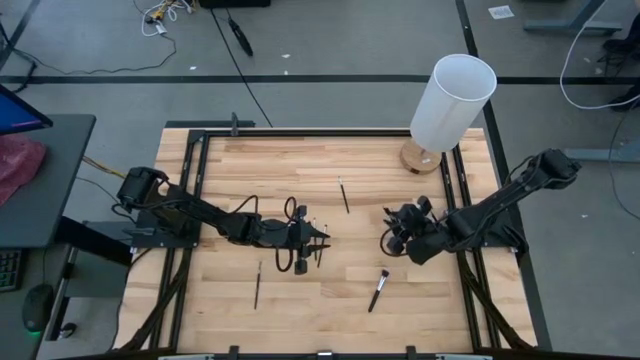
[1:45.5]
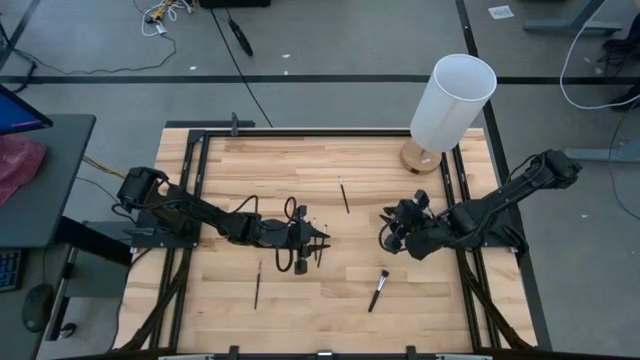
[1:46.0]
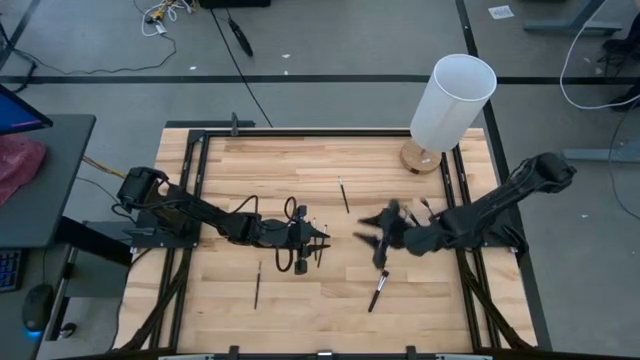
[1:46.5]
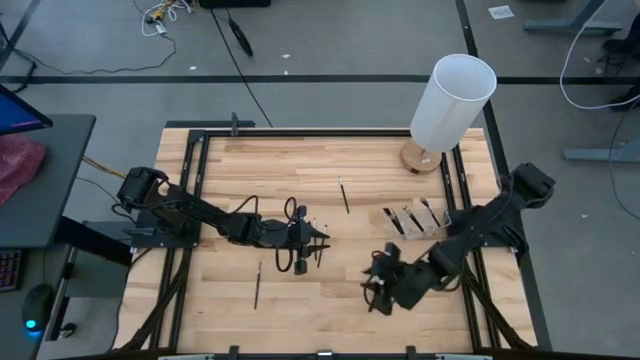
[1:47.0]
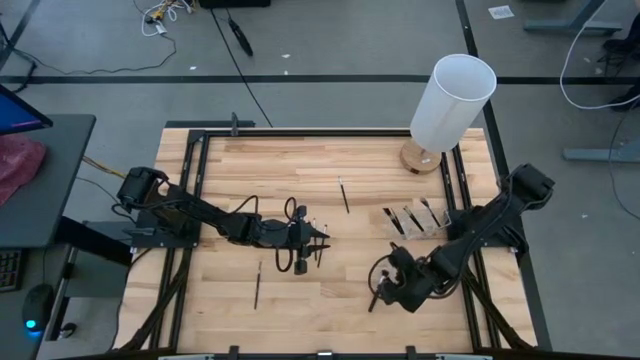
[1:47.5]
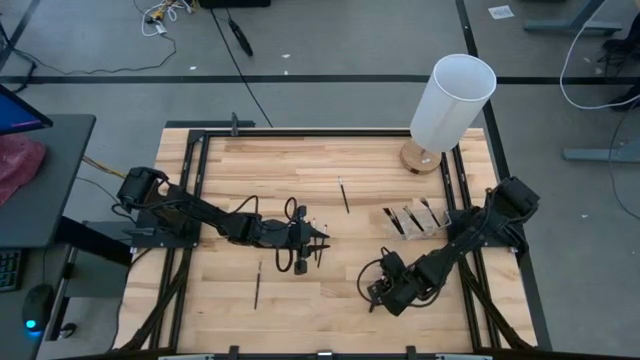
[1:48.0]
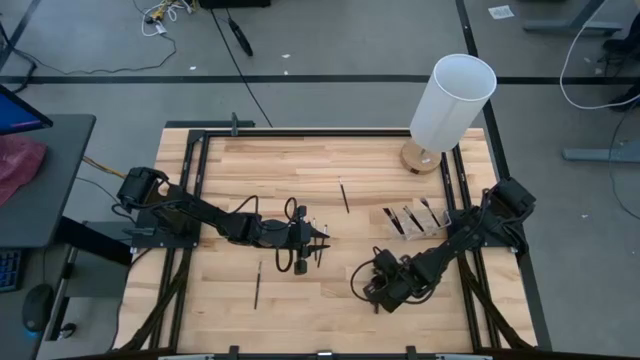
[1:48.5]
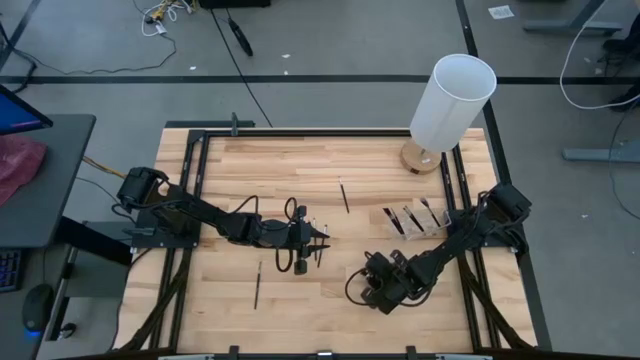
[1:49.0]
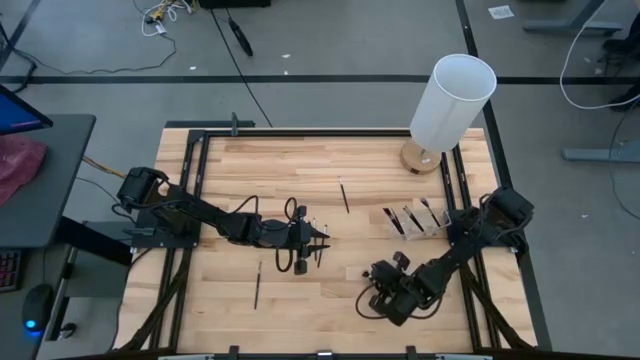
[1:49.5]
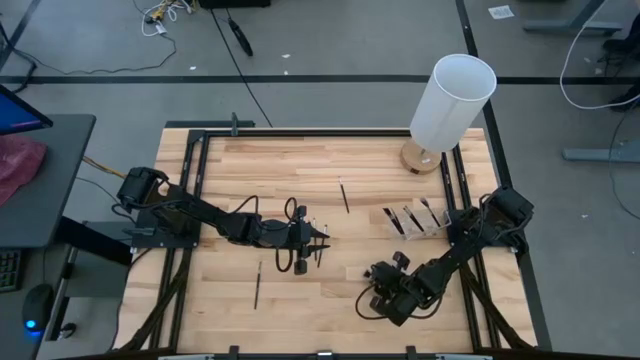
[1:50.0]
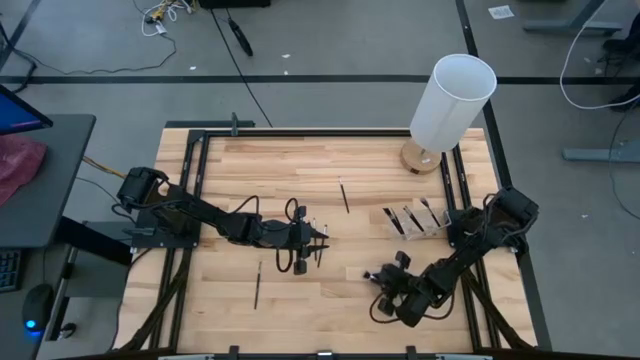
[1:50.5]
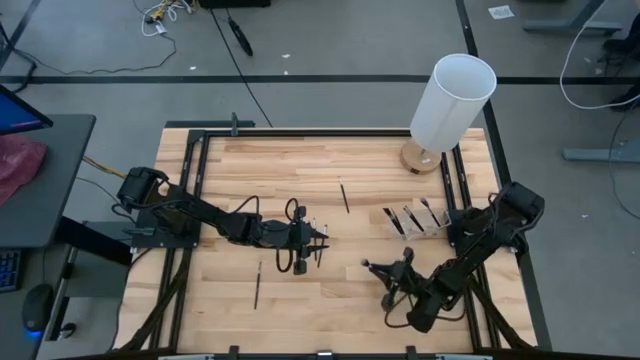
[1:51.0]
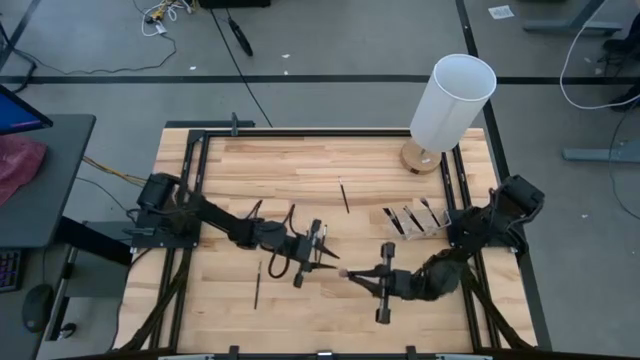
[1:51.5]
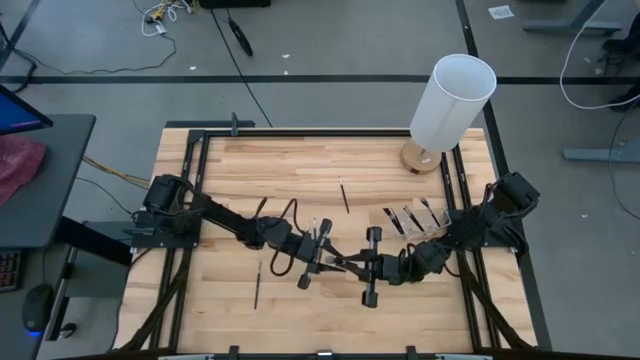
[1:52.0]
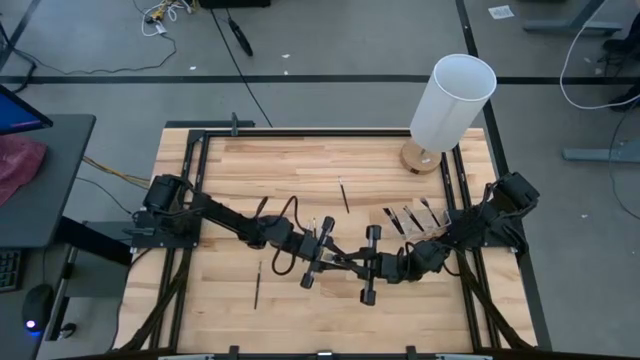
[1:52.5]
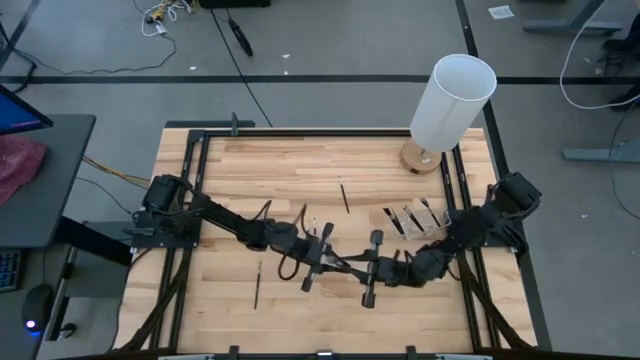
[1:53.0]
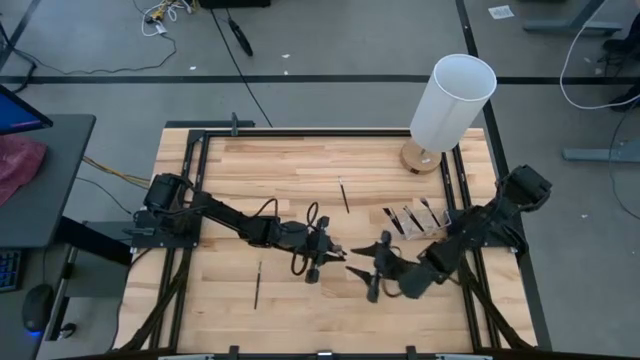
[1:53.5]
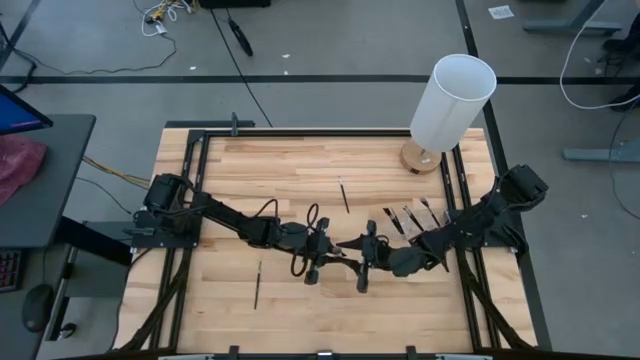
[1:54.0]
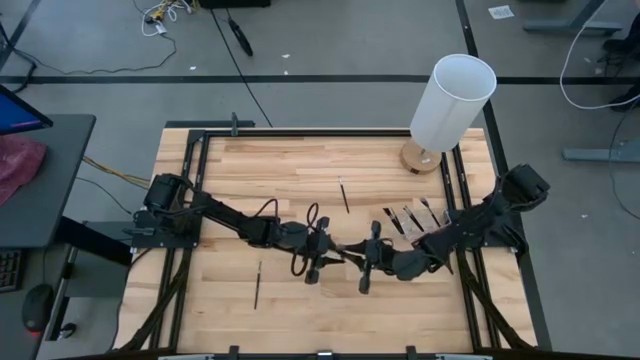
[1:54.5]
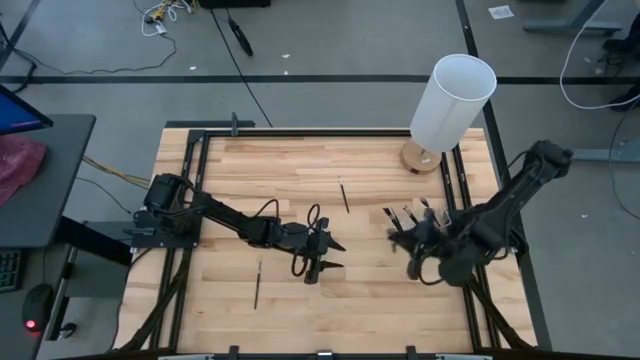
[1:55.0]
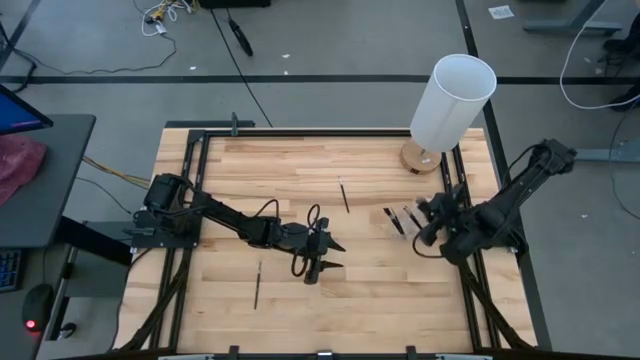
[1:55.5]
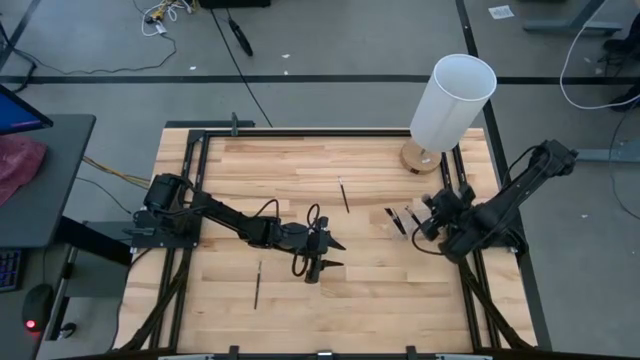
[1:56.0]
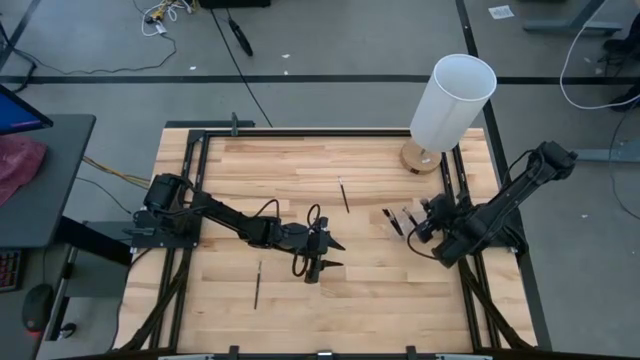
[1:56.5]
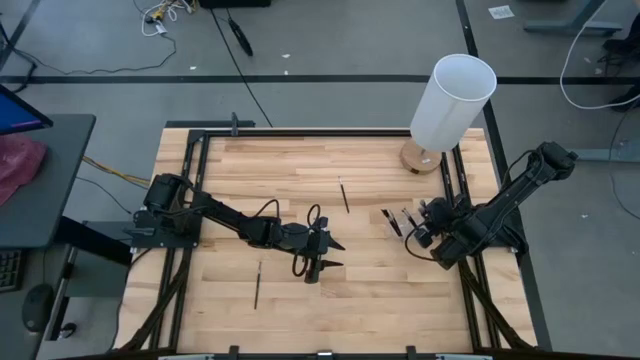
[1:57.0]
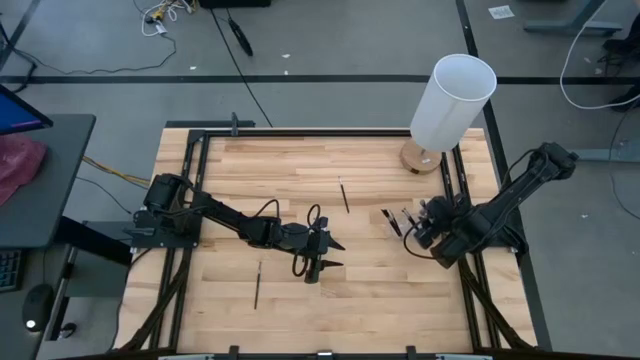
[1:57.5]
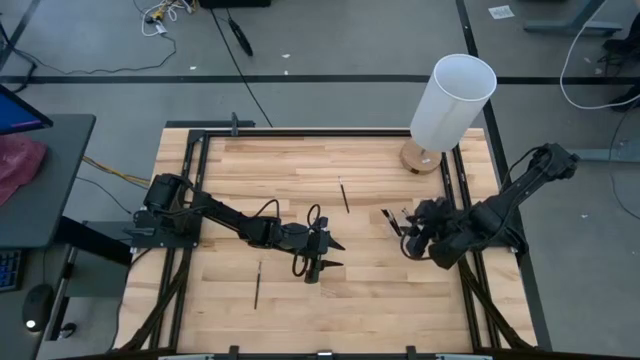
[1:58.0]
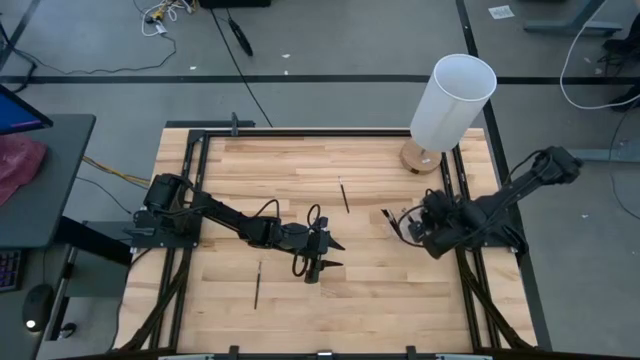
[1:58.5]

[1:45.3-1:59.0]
Task: Put items in baskets/containers
Put the black powder brush into the transparent bin
